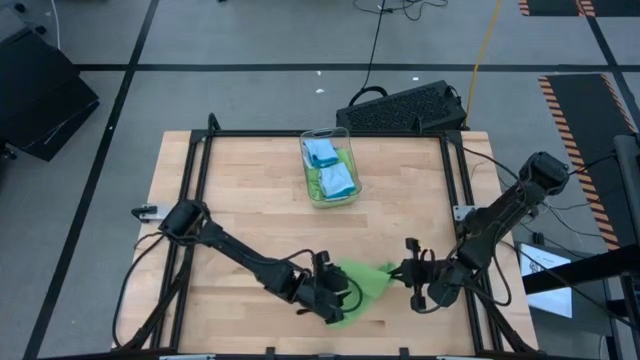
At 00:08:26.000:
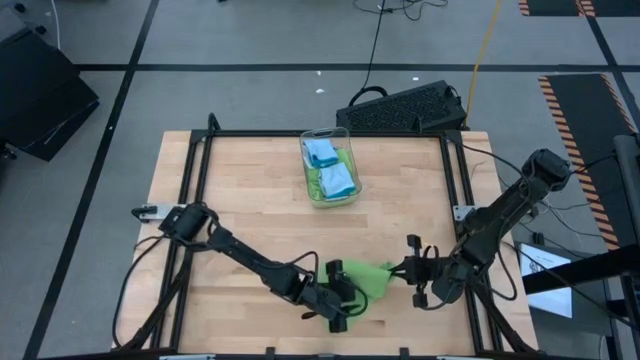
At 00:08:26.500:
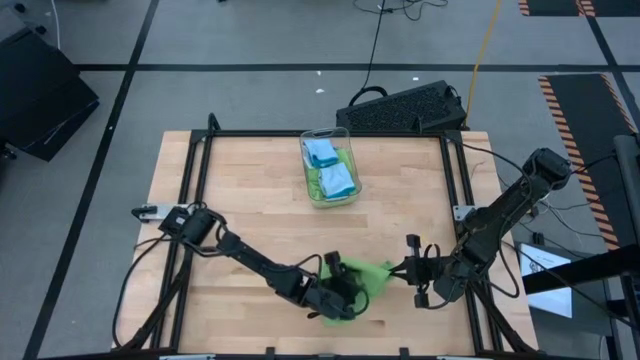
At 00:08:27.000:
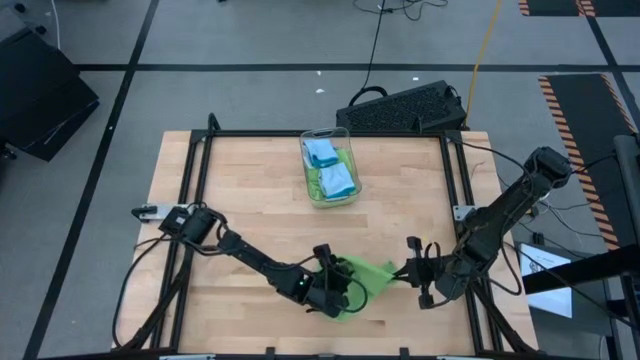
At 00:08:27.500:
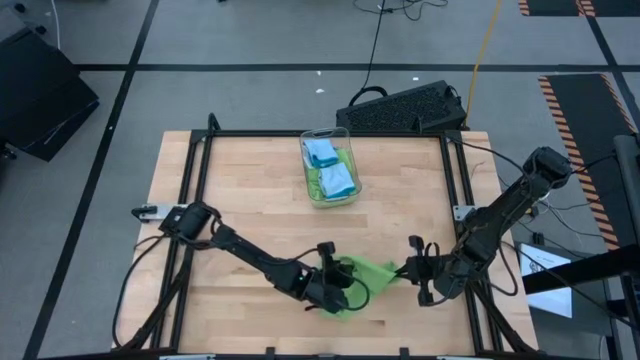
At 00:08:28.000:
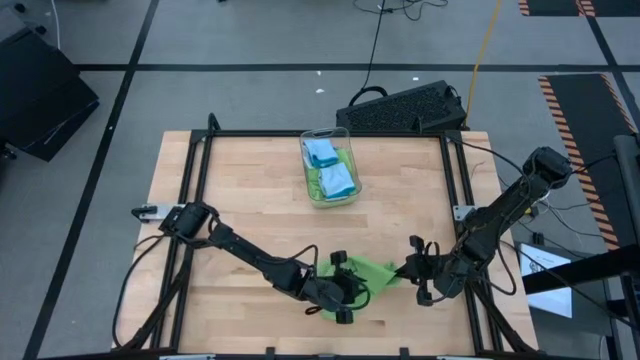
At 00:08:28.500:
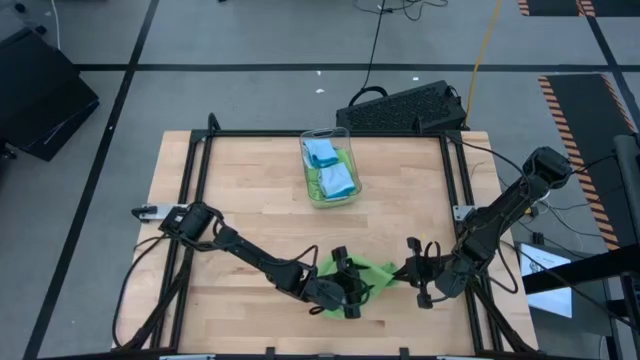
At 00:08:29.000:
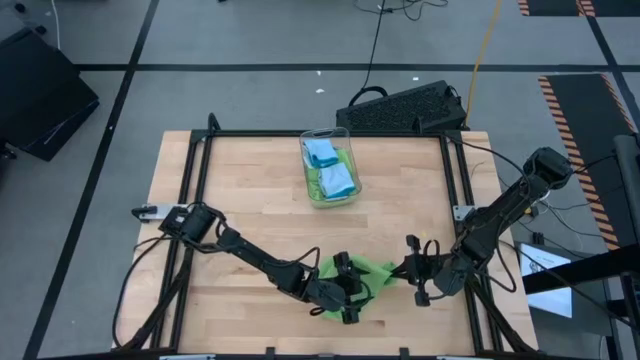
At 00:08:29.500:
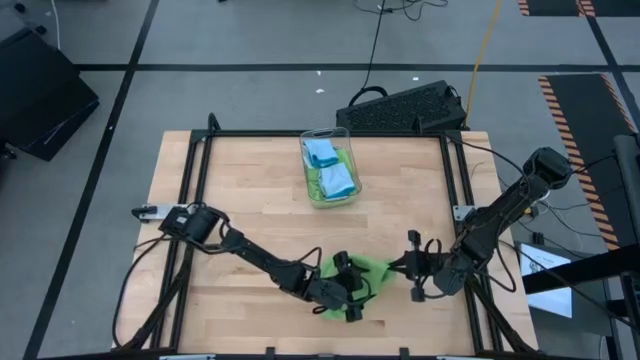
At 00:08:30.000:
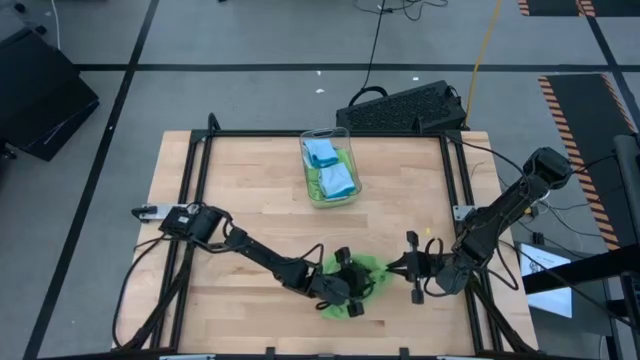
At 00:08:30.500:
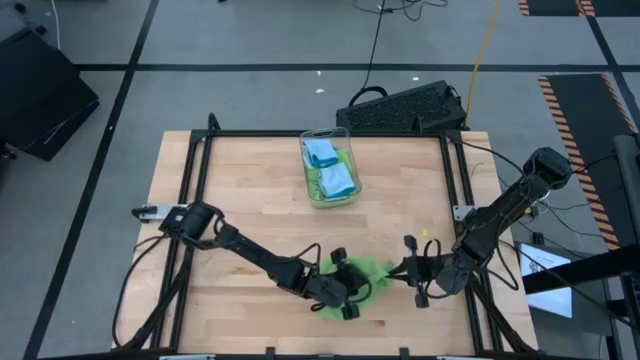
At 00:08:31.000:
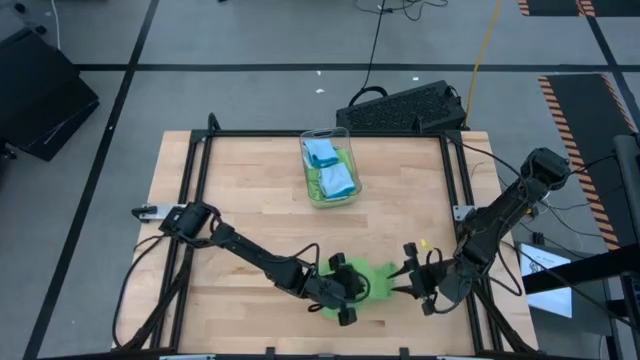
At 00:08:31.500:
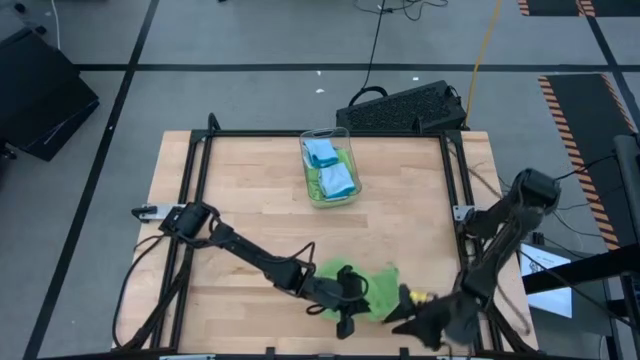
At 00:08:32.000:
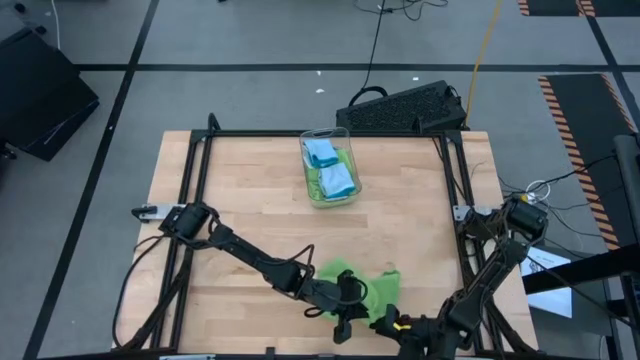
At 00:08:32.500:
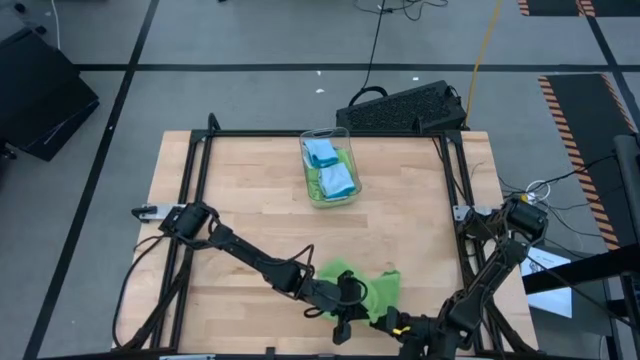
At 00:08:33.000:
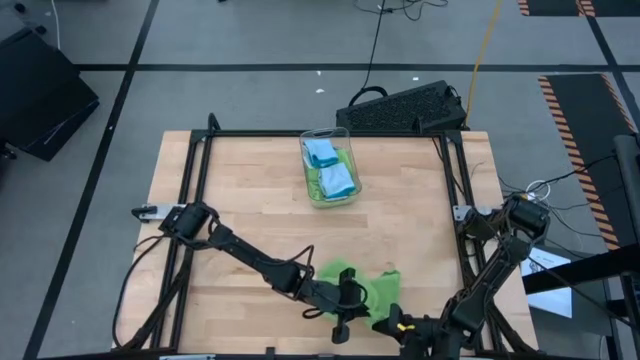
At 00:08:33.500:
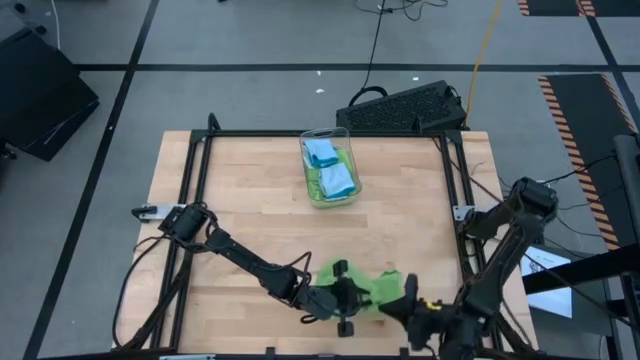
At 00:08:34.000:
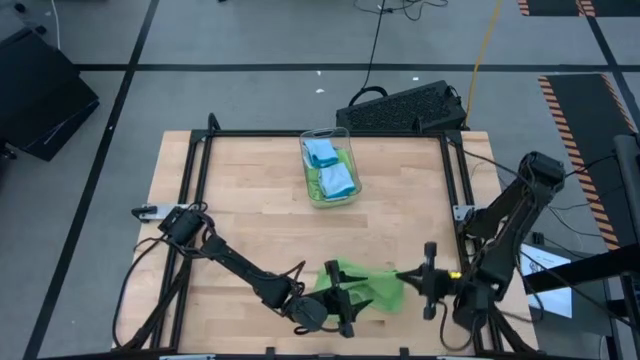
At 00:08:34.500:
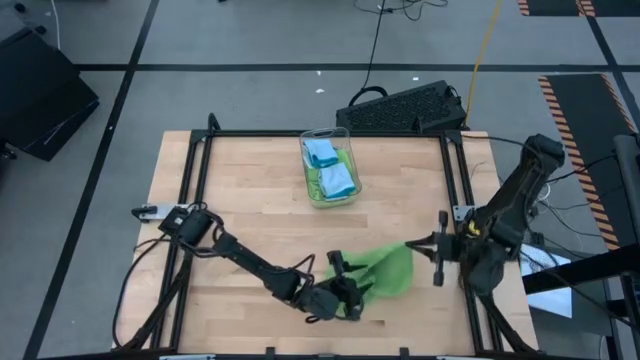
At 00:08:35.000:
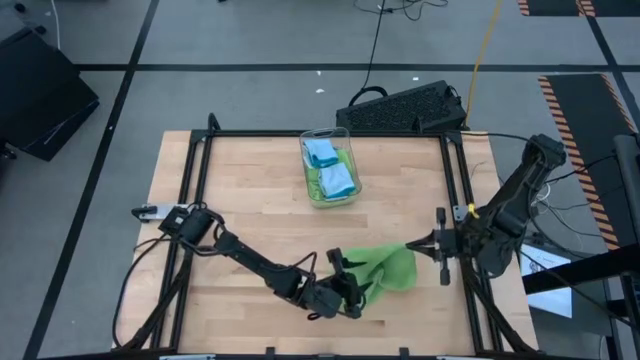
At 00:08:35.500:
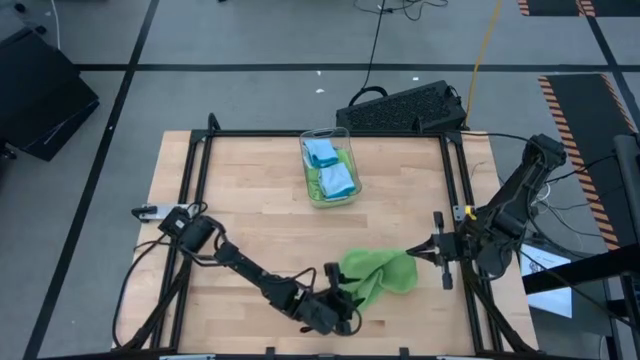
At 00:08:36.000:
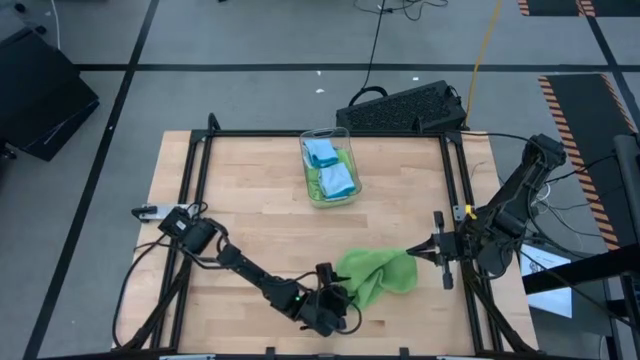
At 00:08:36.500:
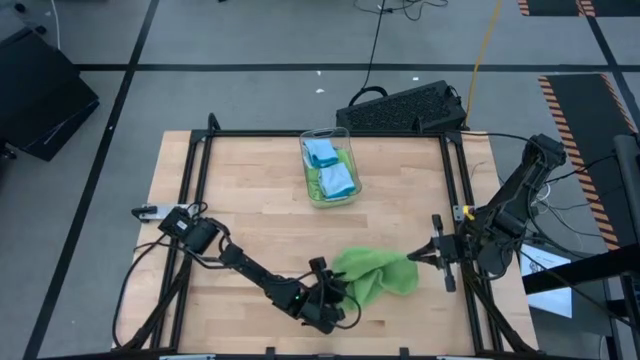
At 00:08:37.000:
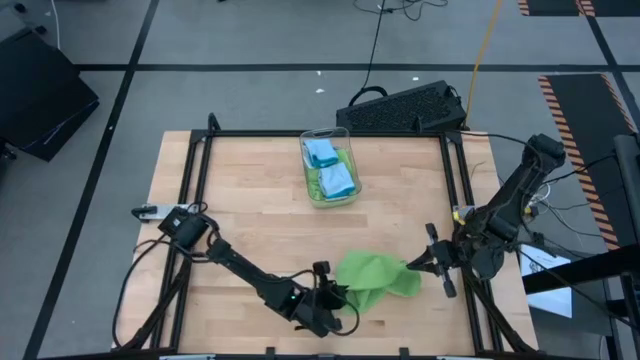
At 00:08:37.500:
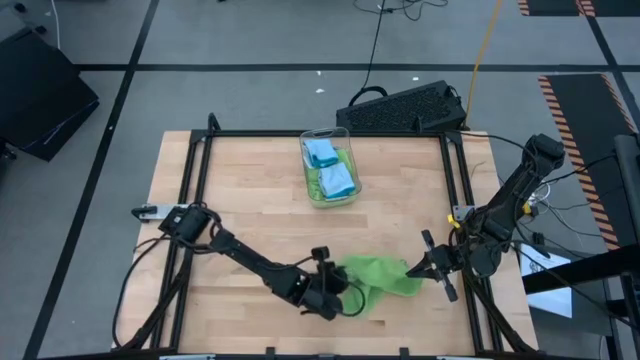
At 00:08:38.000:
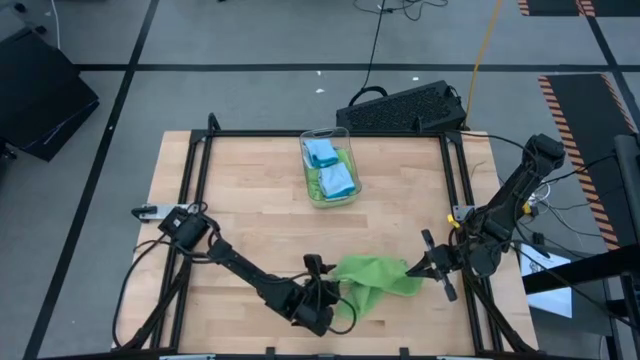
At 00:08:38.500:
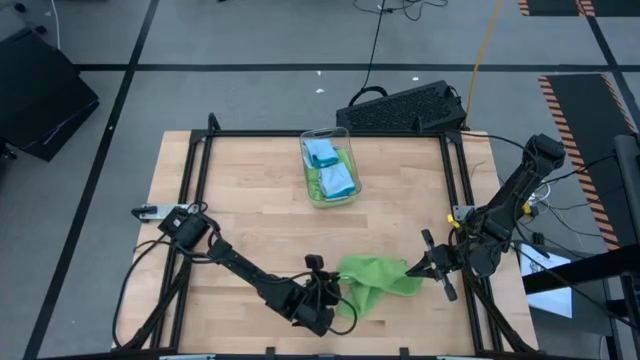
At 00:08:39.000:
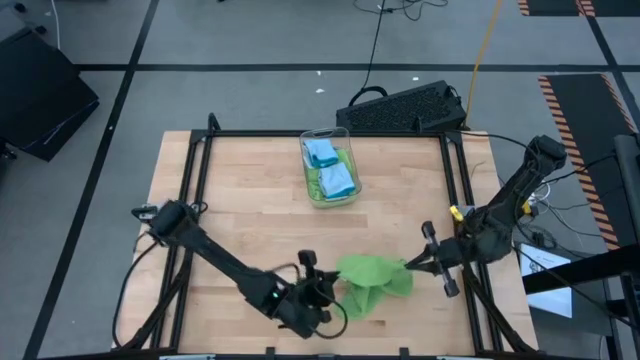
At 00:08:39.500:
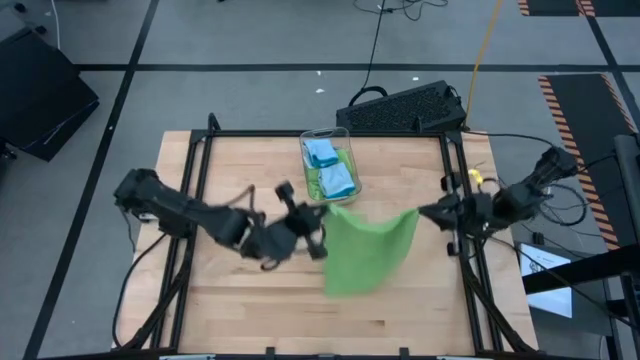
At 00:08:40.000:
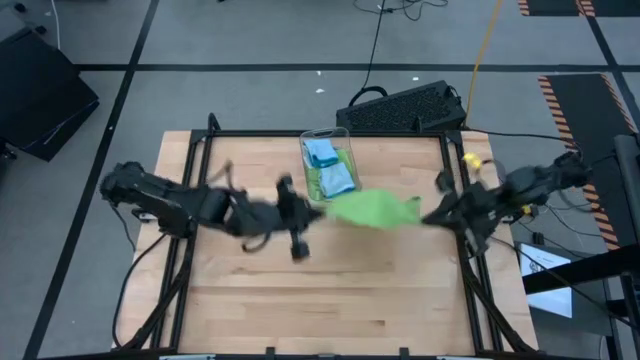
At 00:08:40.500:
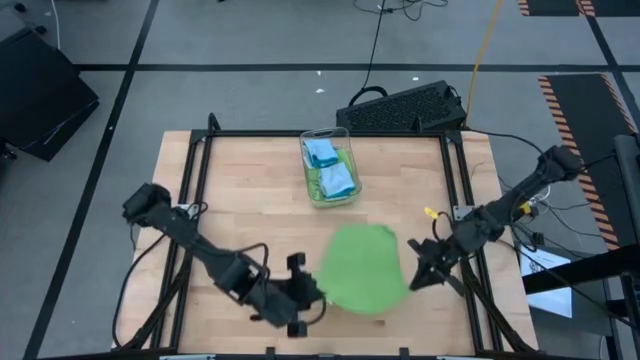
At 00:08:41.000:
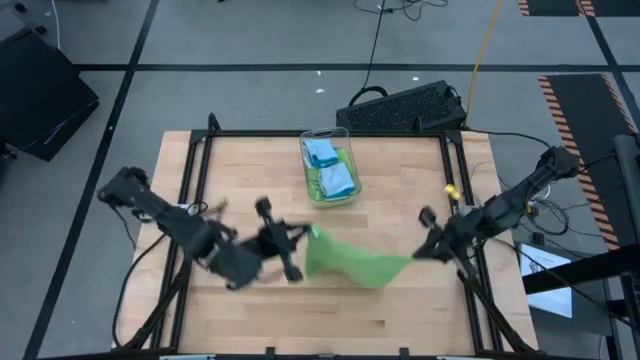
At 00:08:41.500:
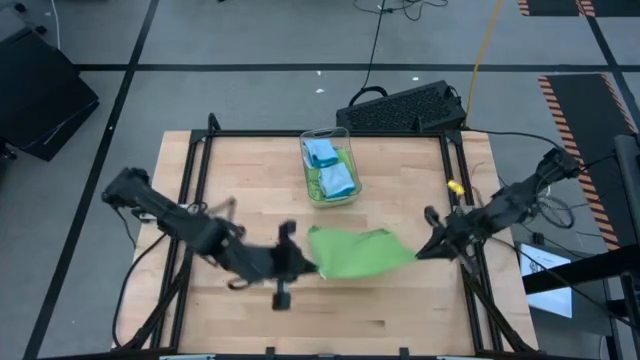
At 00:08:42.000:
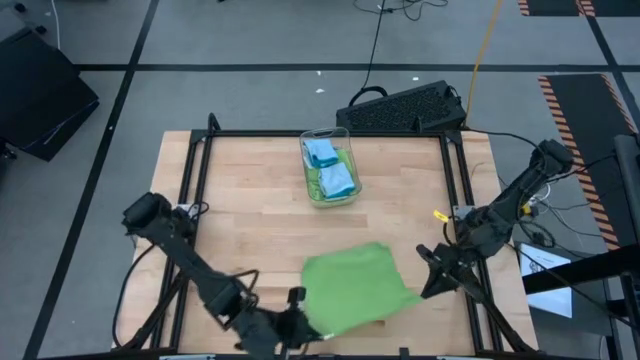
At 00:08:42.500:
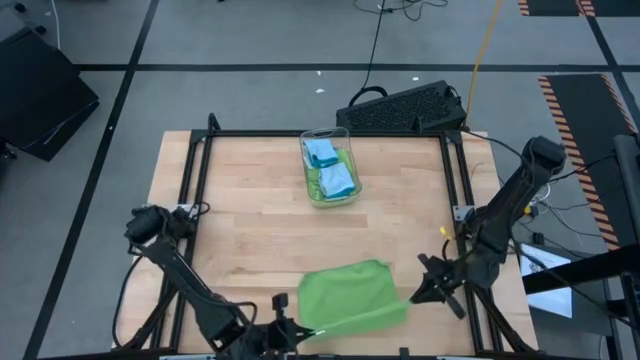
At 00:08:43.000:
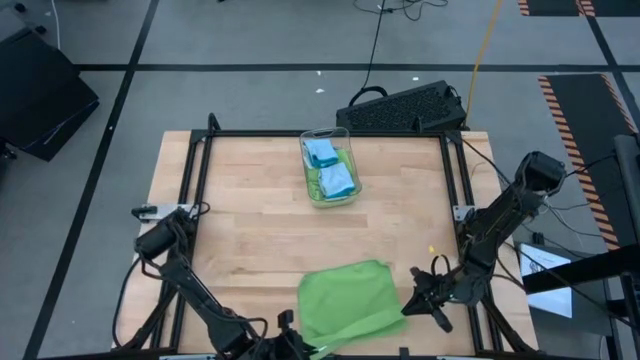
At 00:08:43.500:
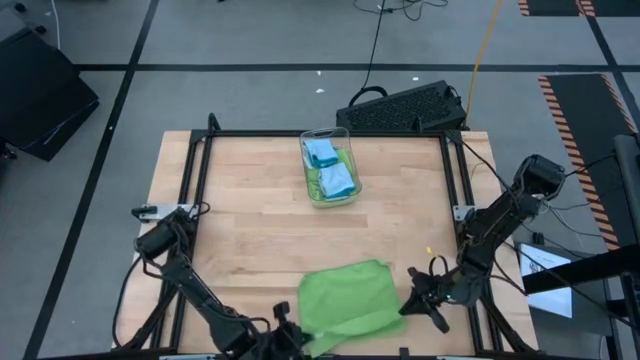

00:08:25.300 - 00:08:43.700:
Task: Fold microfiber towels
Fold the green towel
